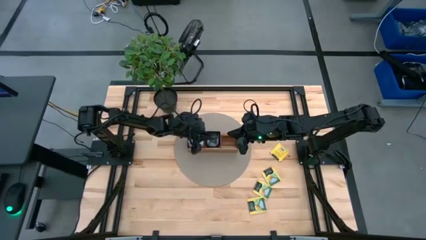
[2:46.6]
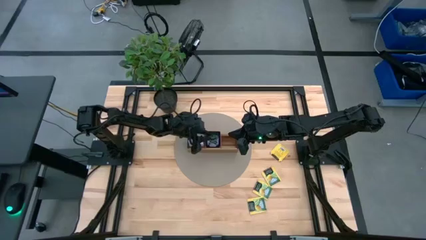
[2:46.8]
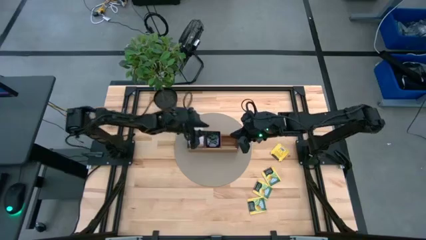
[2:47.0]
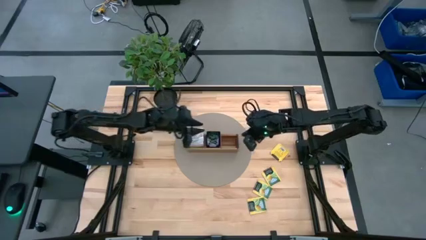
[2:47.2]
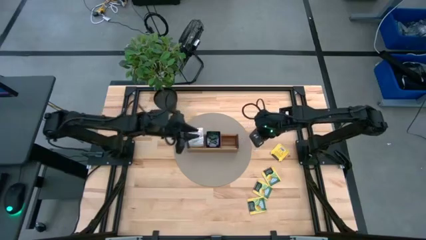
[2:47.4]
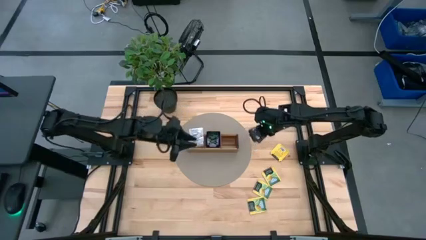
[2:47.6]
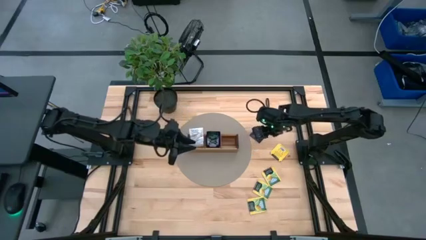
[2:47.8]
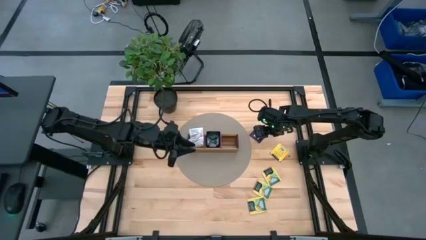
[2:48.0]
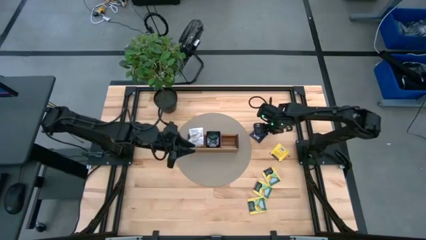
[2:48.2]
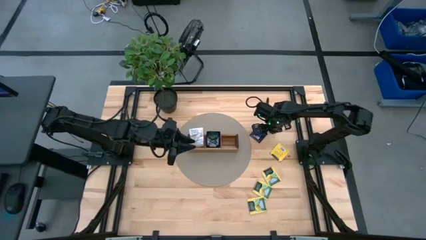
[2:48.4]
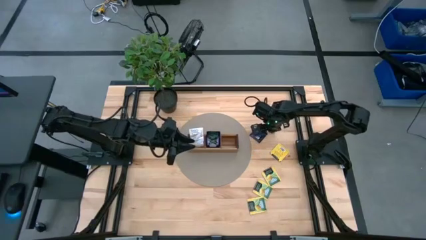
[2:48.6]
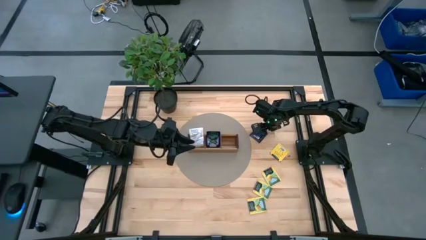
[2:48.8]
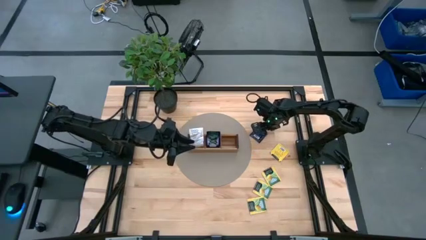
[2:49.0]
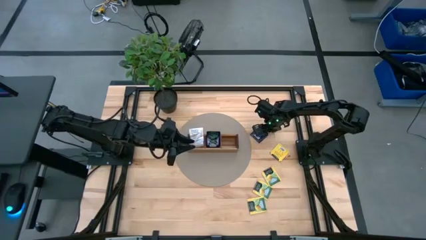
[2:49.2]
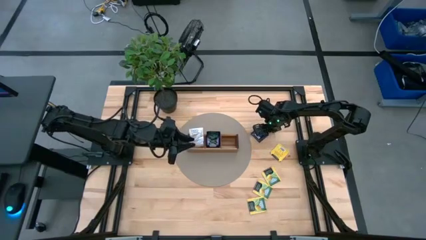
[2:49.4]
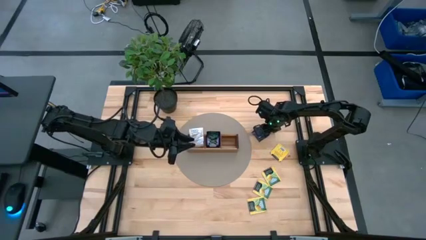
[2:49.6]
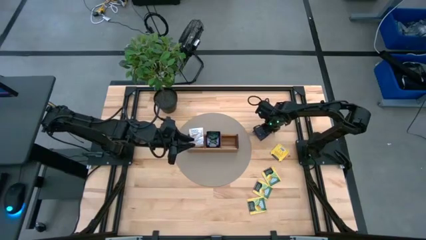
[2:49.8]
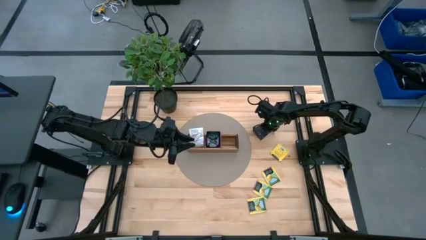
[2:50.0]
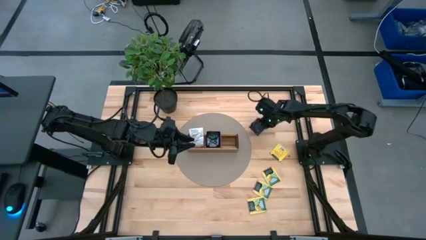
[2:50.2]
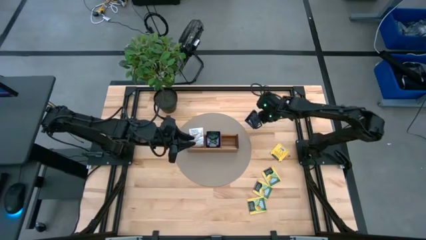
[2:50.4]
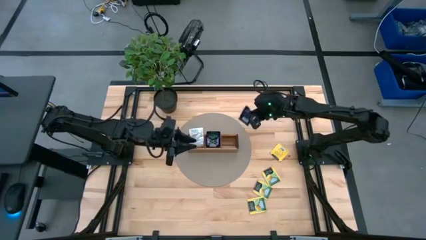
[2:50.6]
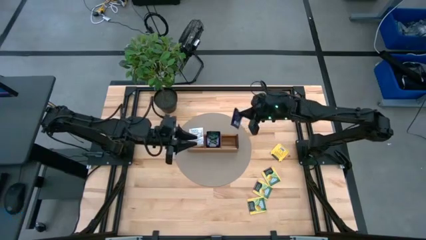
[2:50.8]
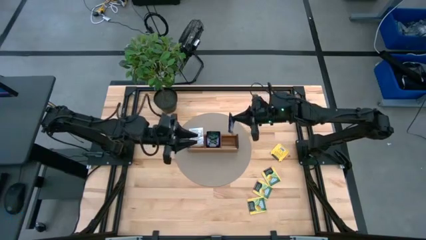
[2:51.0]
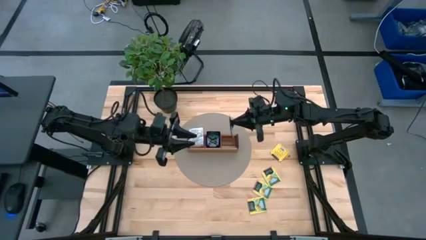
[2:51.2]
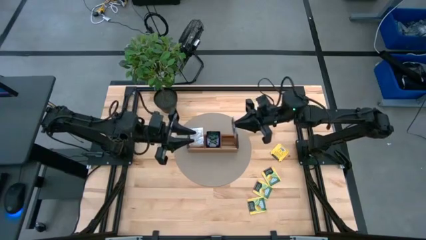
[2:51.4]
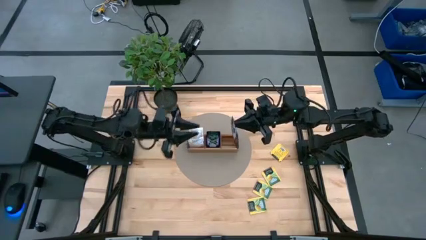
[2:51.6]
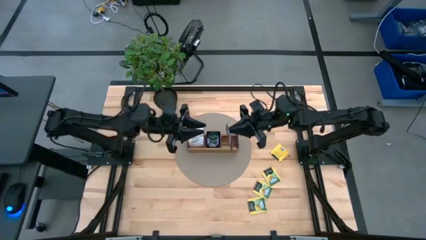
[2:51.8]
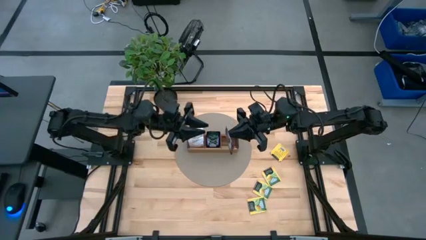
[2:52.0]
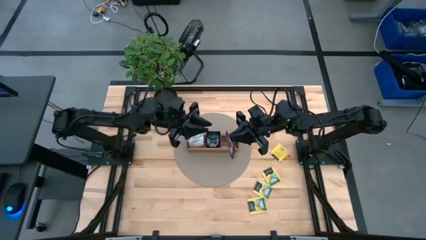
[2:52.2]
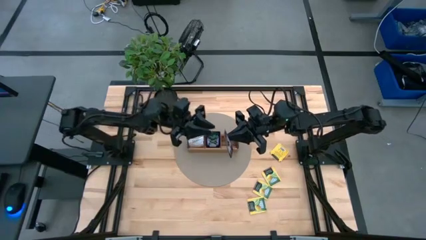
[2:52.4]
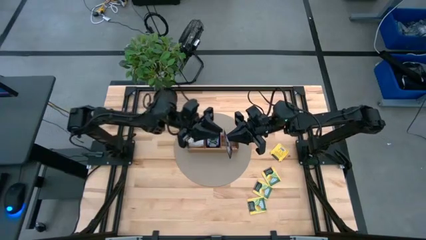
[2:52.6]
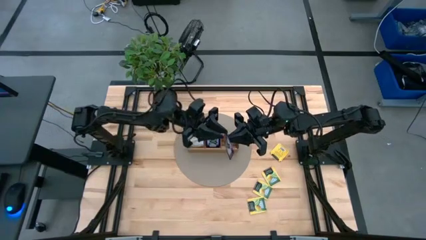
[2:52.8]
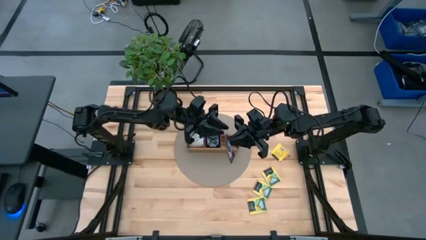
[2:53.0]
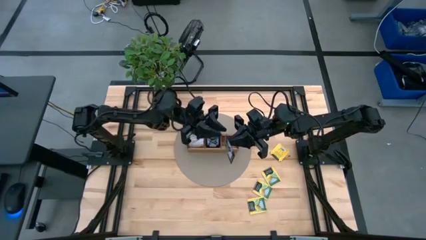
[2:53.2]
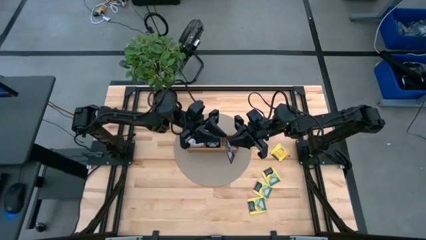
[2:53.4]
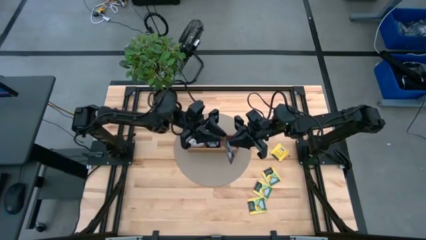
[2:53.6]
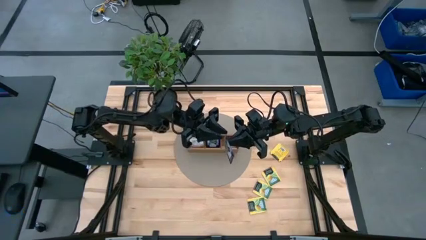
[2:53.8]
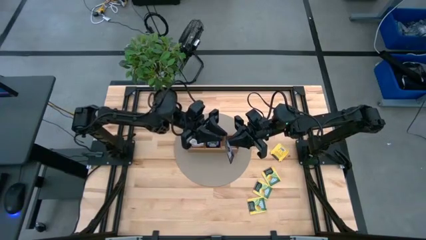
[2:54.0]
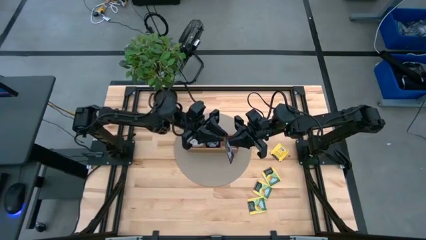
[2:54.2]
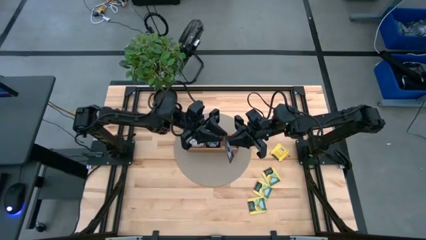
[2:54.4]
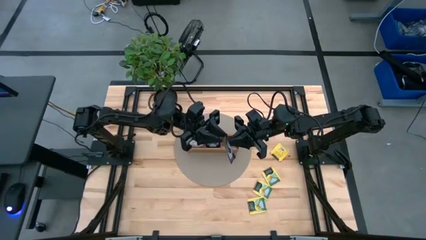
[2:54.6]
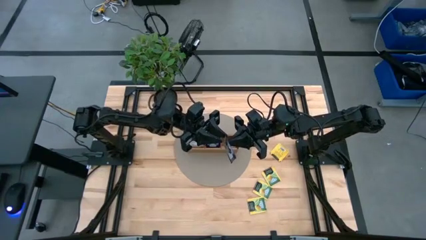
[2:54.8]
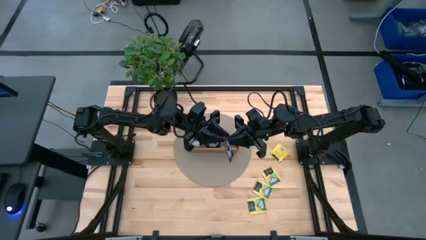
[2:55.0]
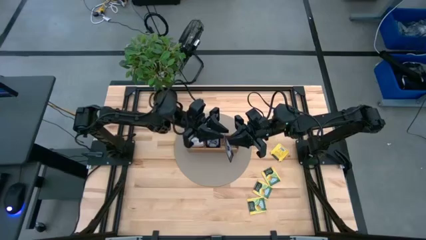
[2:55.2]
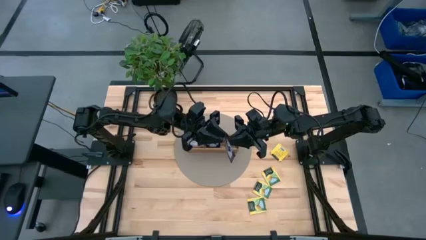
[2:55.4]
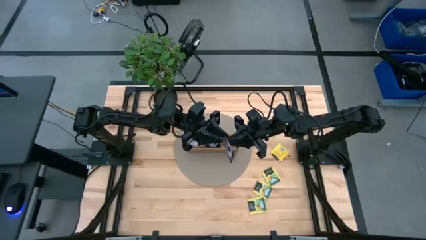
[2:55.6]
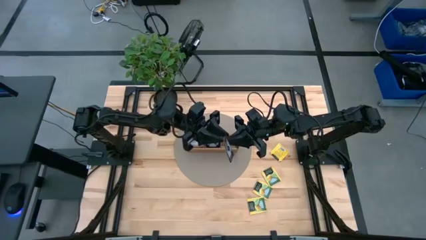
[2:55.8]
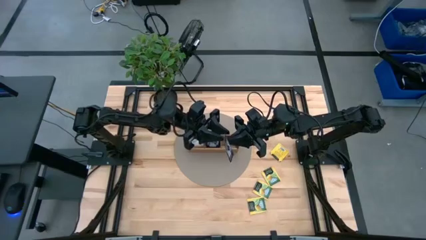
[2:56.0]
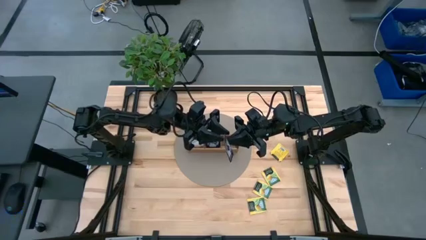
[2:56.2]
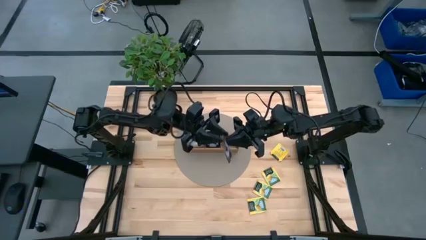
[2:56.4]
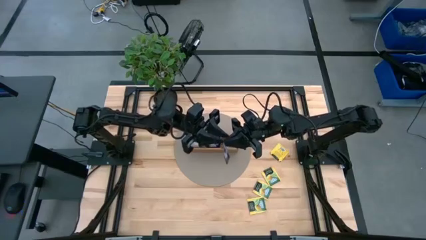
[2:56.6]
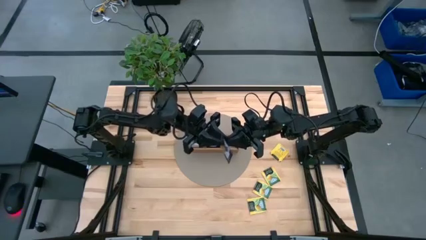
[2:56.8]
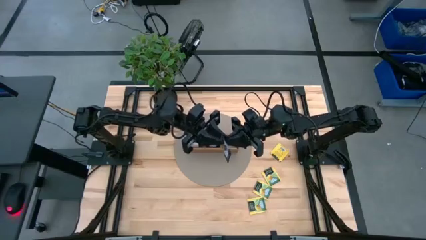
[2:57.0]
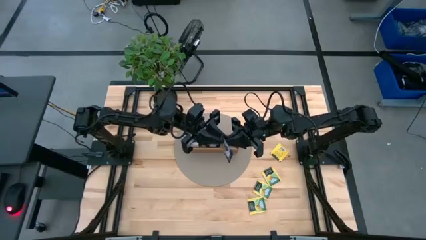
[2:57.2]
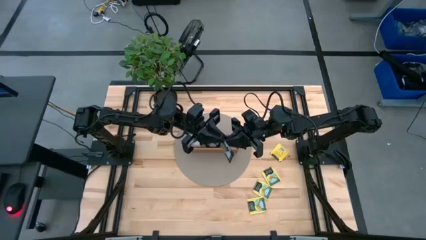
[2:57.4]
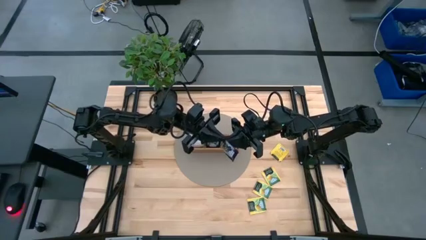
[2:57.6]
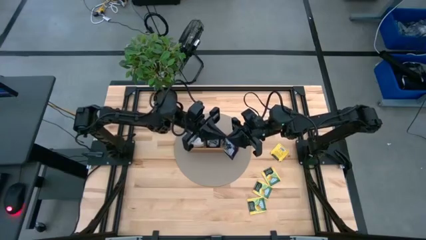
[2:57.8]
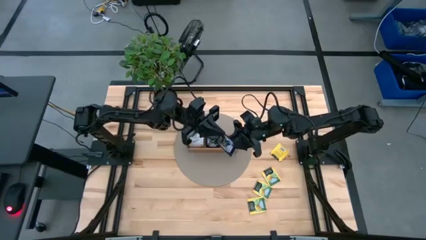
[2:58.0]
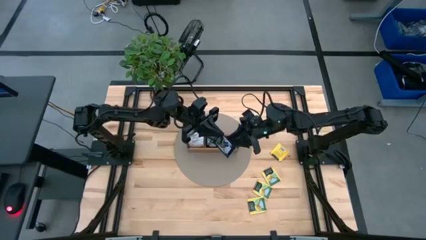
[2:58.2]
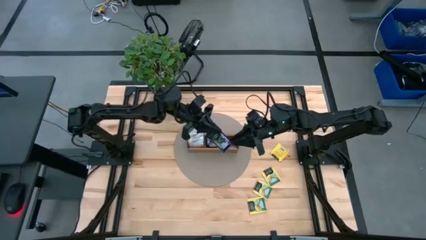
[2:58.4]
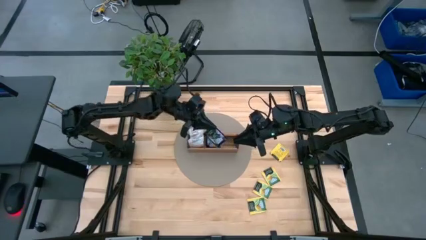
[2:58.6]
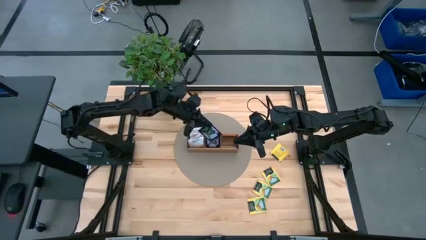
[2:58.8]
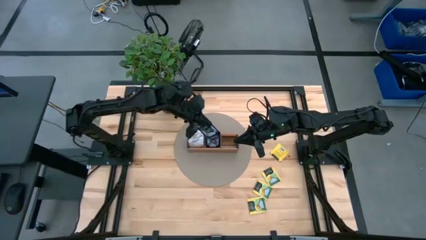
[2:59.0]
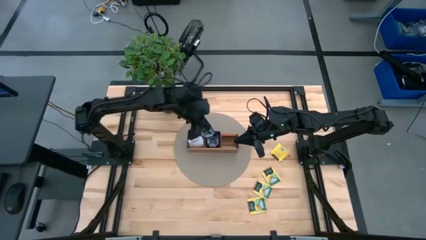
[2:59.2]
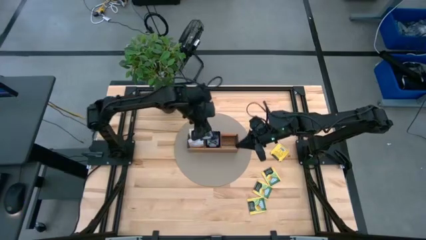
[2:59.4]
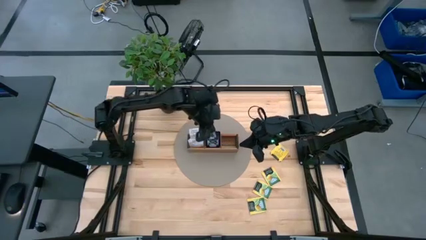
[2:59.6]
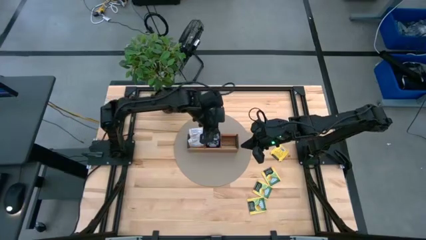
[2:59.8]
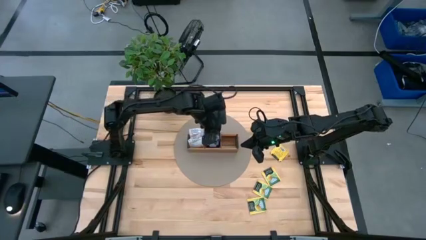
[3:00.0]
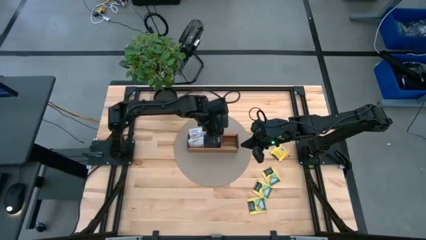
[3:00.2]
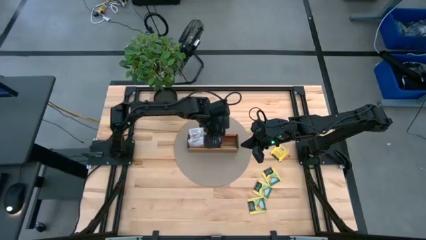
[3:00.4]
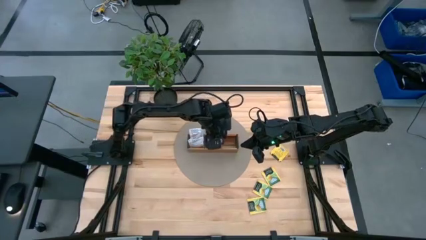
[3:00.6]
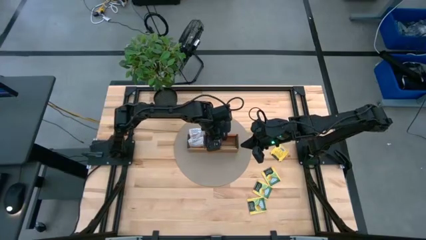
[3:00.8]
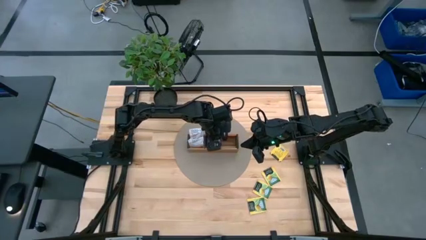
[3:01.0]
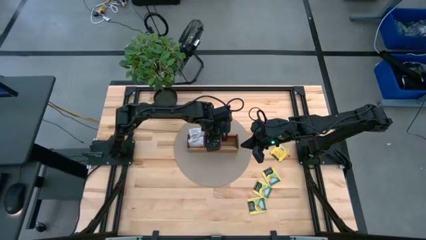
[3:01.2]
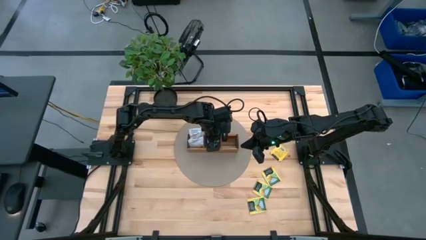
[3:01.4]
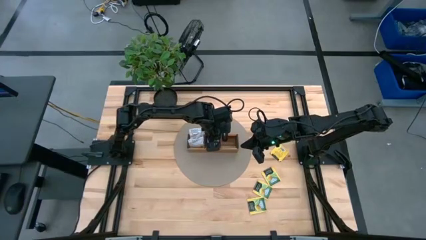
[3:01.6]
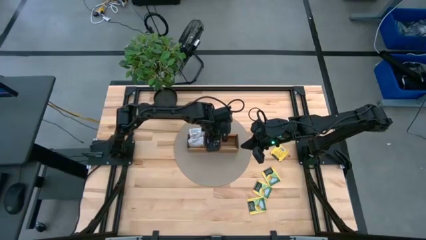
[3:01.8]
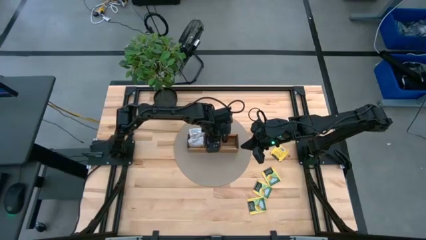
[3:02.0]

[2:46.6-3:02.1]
Task: Pick & Place Tea
Put the blue tea bag into the middle section of the wooden organizer

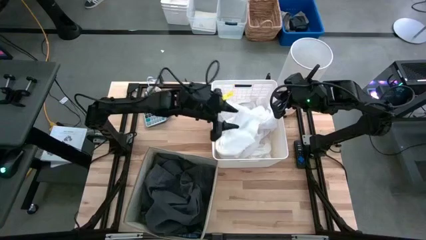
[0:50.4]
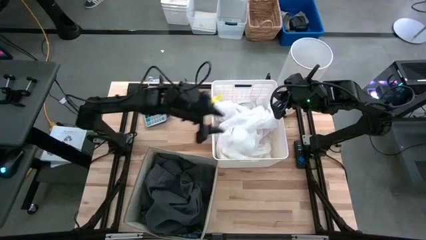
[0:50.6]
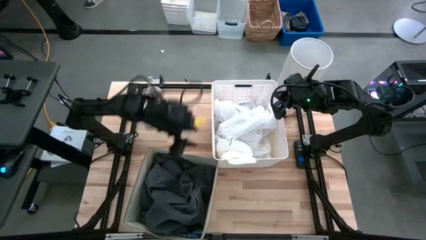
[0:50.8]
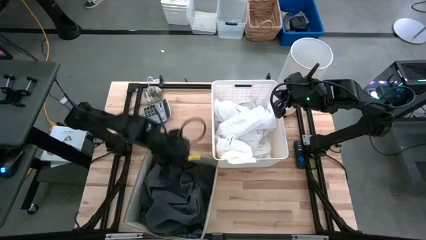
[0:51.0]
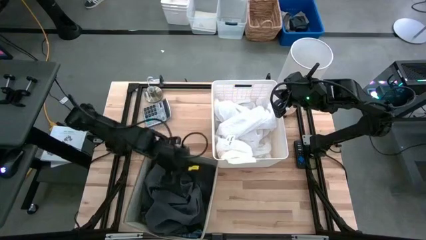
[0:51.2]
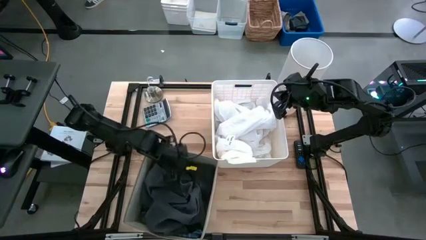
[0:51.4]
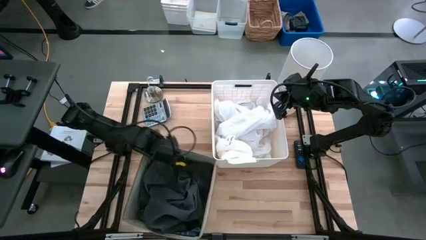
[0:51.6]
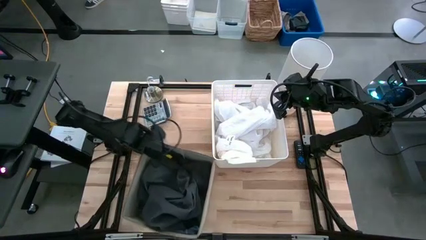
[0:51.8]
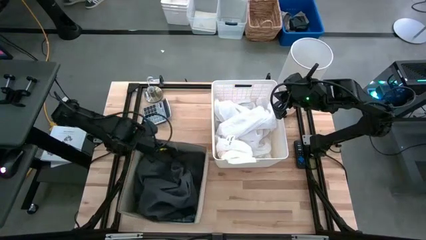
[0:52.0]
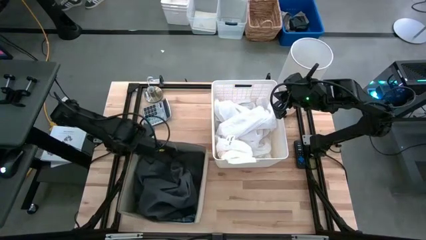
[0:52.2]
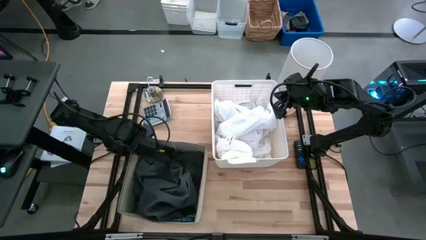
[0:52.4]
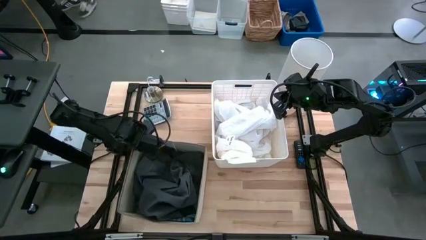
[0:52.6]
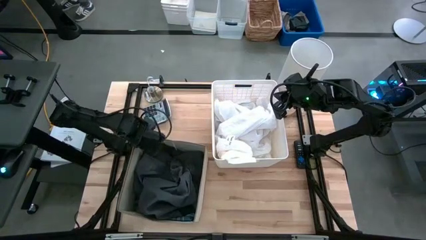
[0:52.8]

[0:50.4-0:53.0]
Task: Sort clothes
Adjust the laundry organizer
